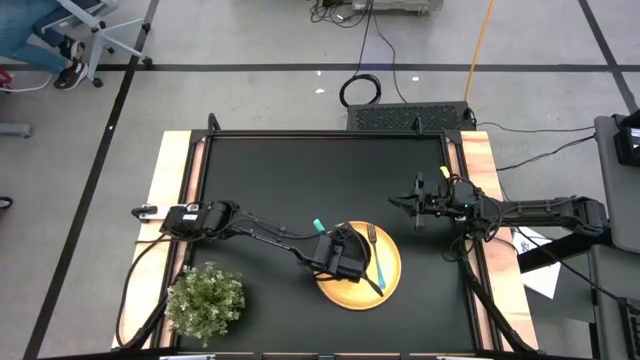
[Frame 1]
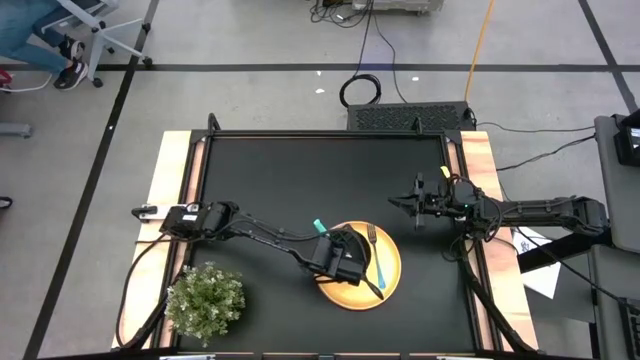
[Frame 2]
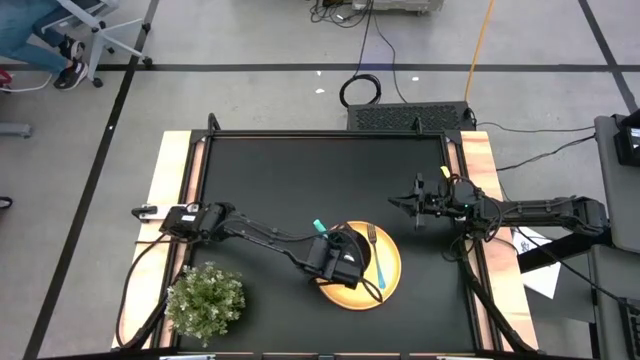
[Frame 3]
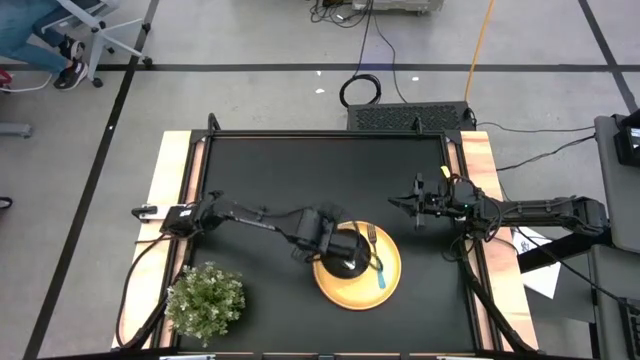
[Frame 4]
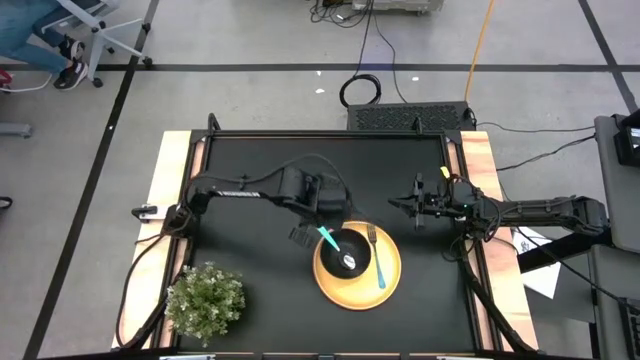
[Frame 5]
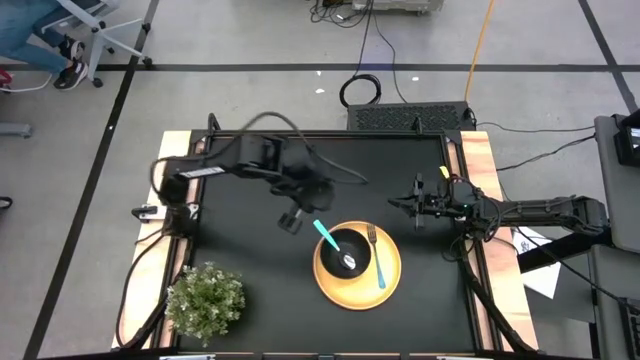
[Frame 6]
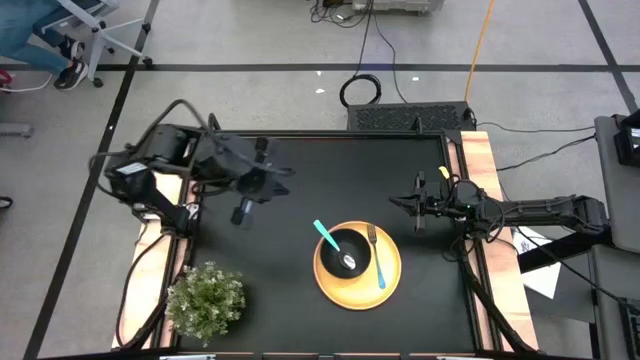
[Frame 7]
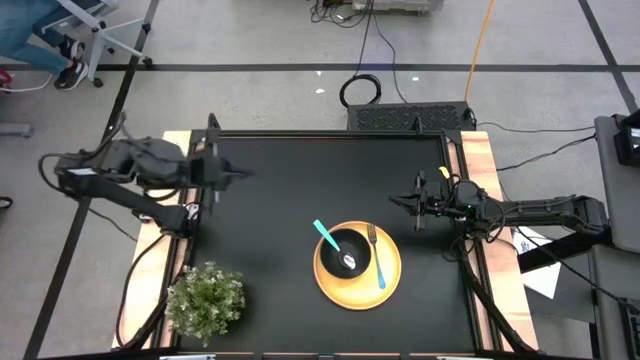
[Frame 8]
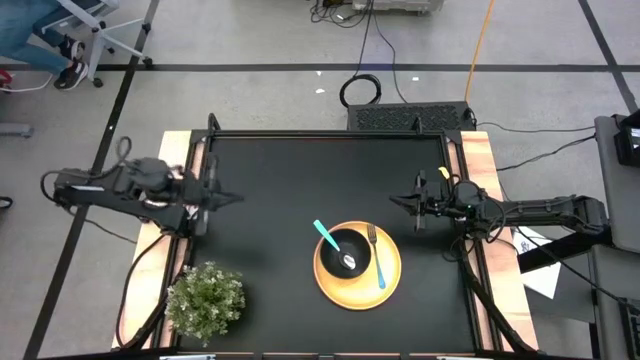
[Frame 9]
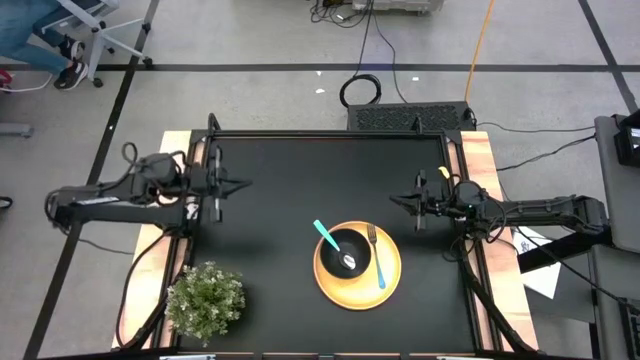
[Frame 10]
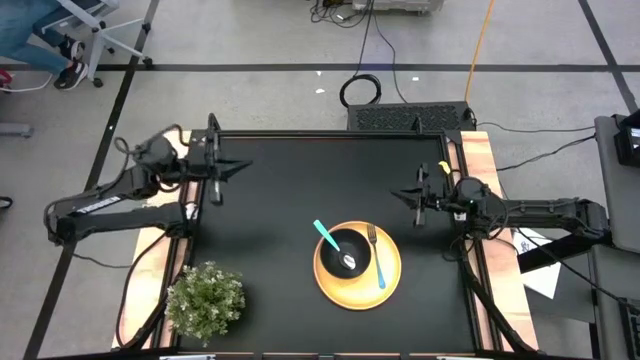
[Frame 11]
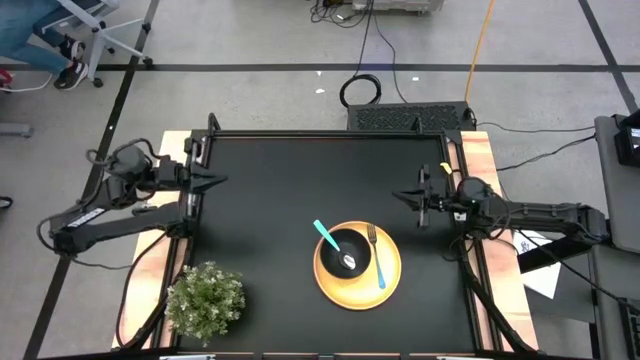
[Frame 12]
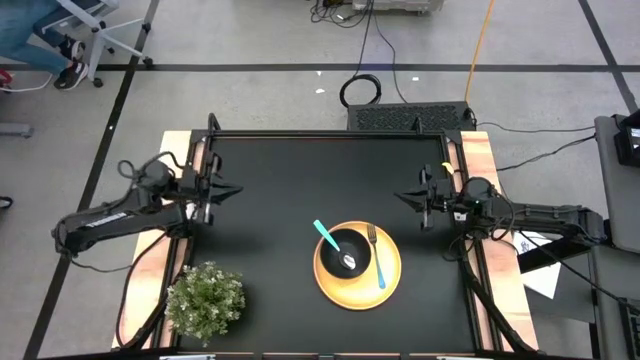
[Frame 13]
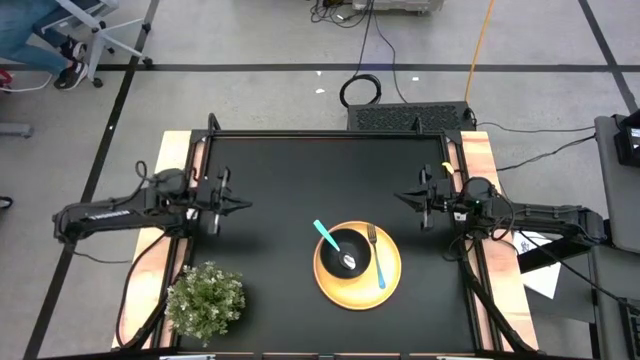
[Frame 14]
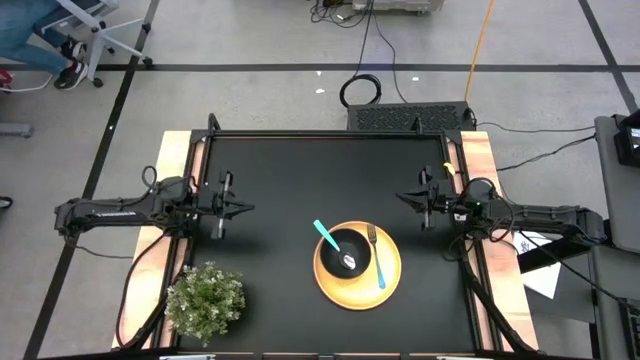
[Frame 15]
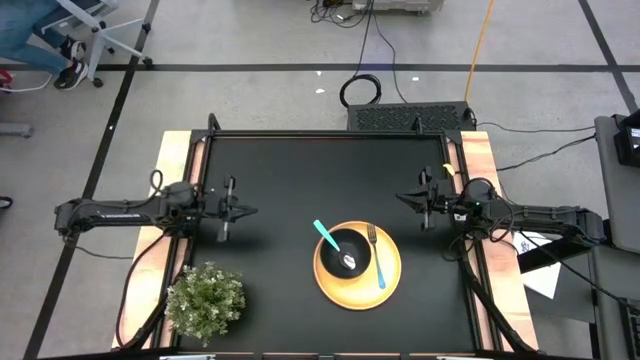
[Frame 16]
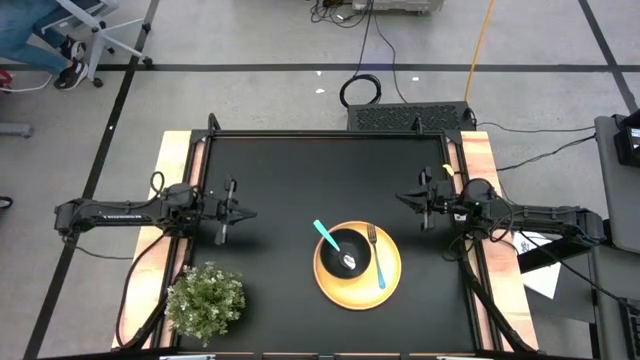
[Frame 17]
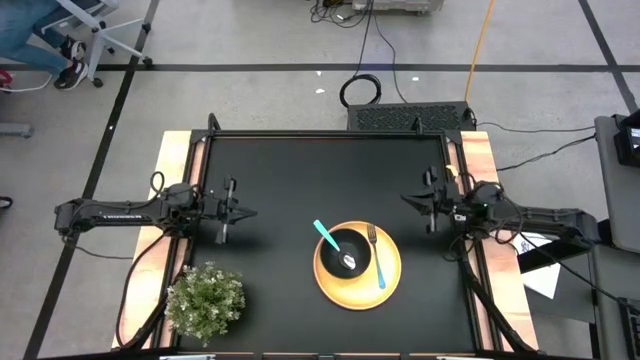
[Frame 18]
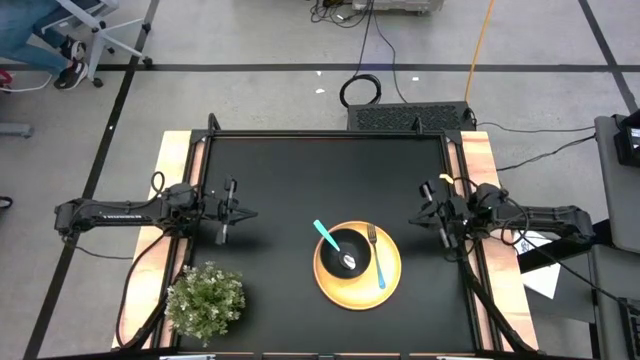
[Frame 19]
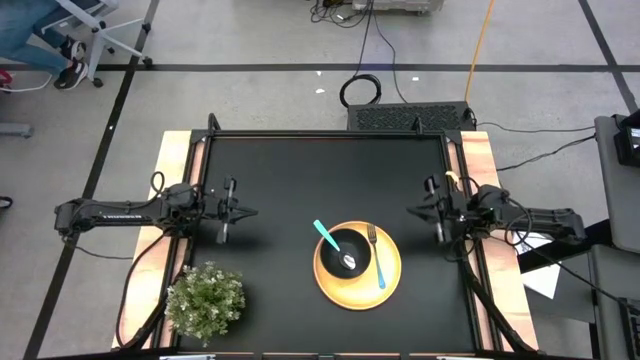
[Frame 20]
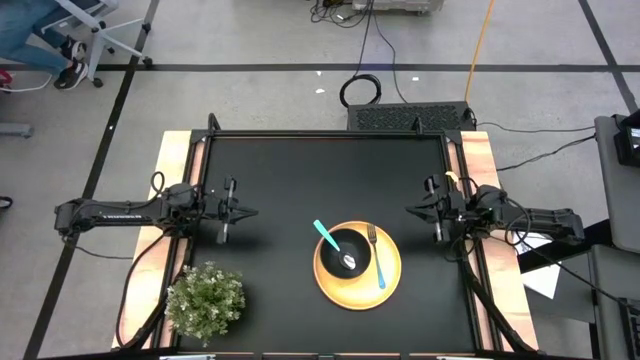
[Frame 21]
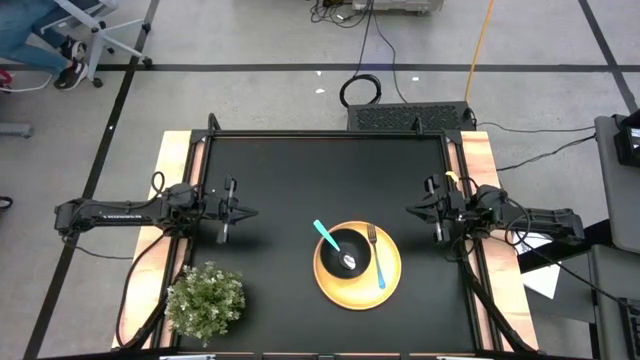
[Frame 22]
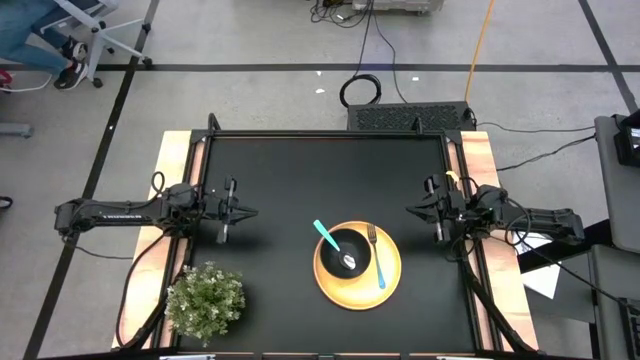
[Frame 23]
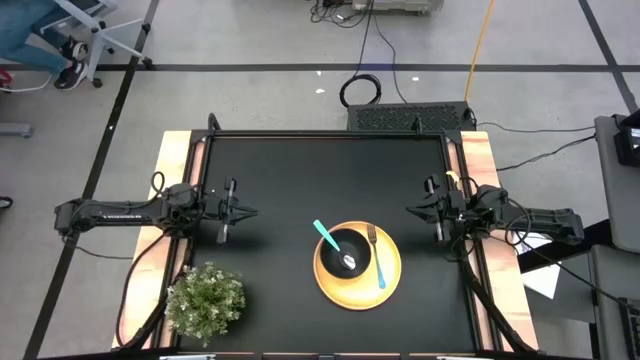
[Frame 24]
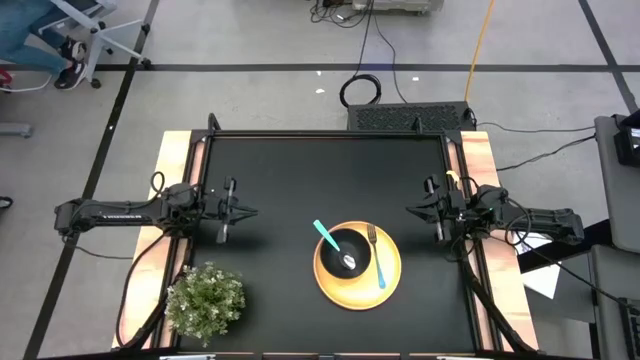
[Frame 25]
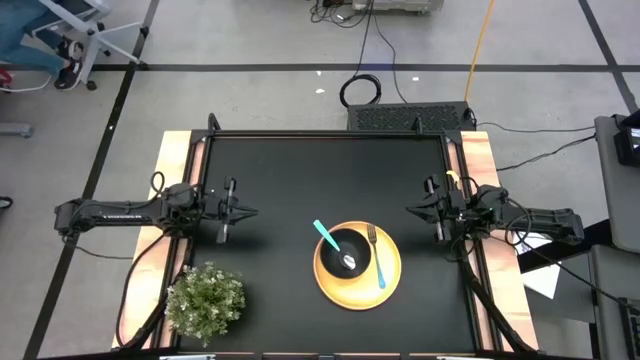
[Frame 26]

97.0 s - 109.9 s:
Task: Set table place
Return to Home Position

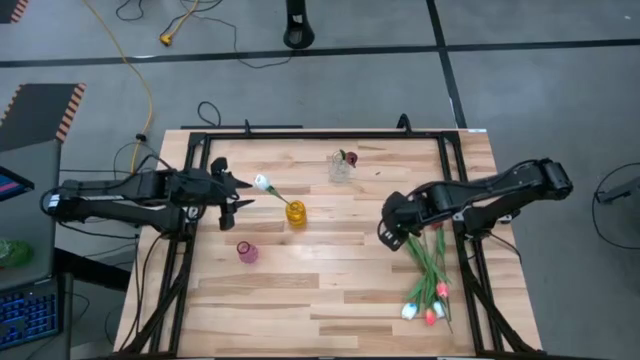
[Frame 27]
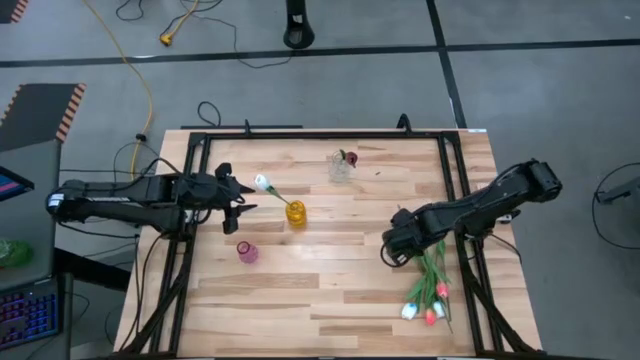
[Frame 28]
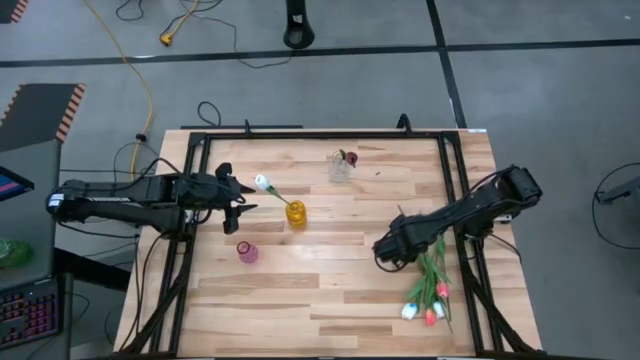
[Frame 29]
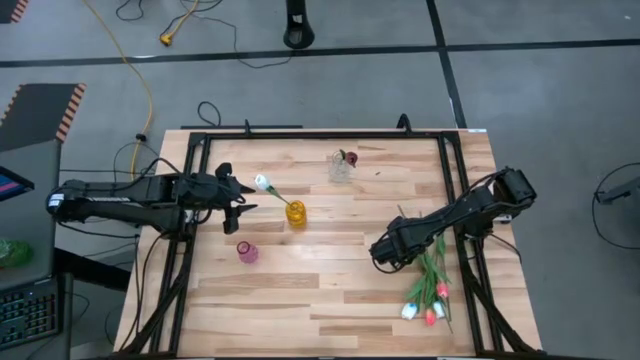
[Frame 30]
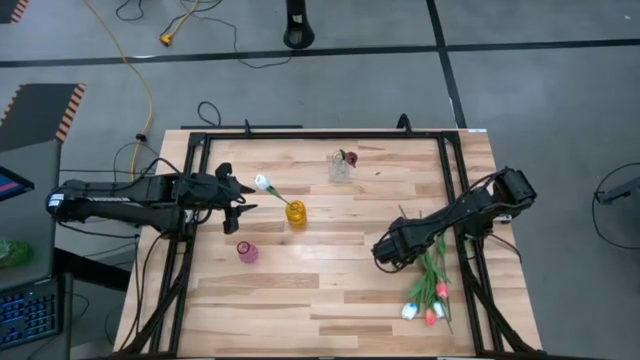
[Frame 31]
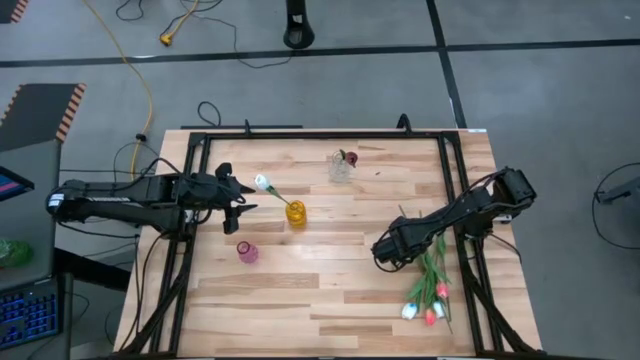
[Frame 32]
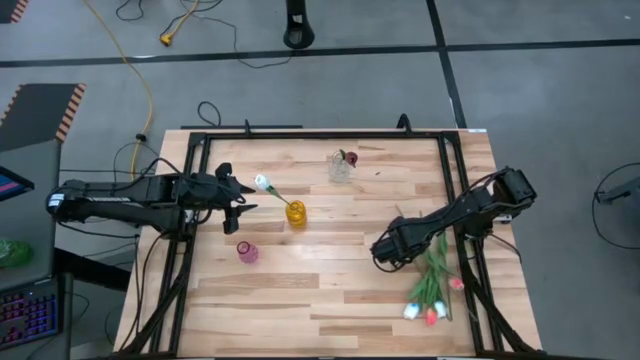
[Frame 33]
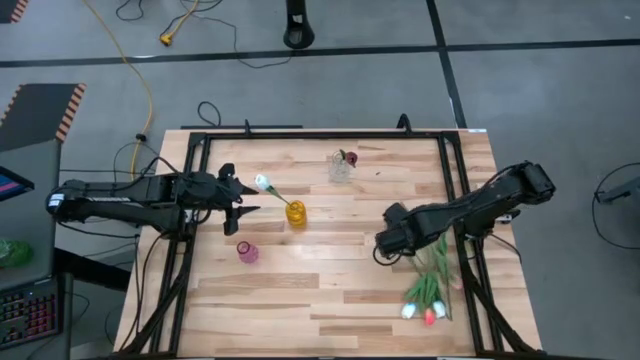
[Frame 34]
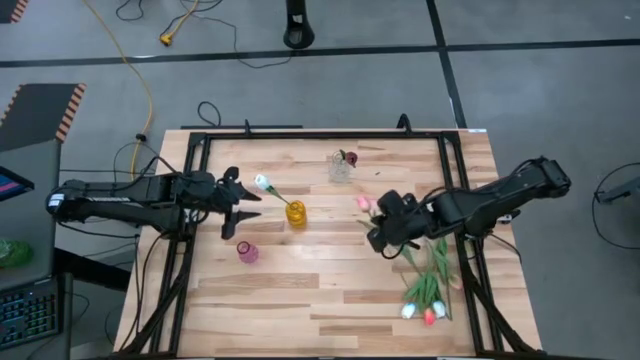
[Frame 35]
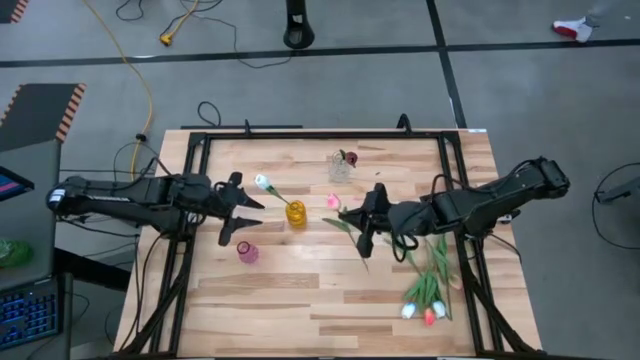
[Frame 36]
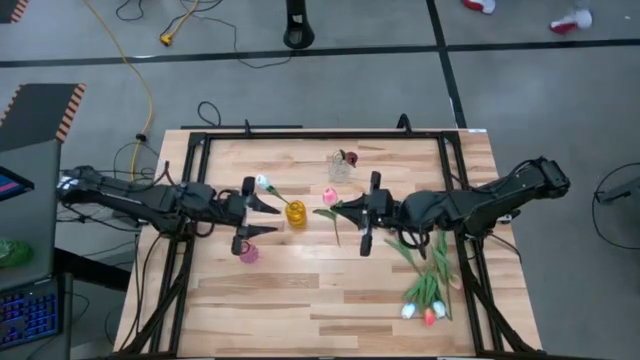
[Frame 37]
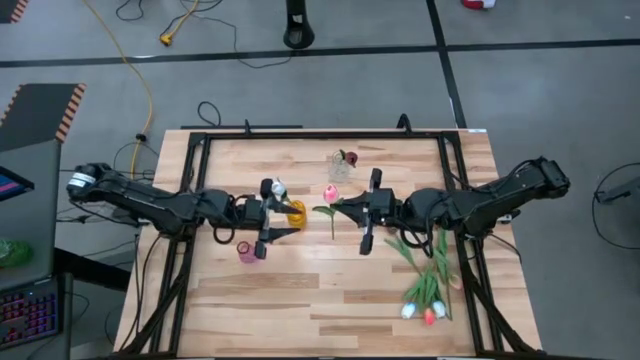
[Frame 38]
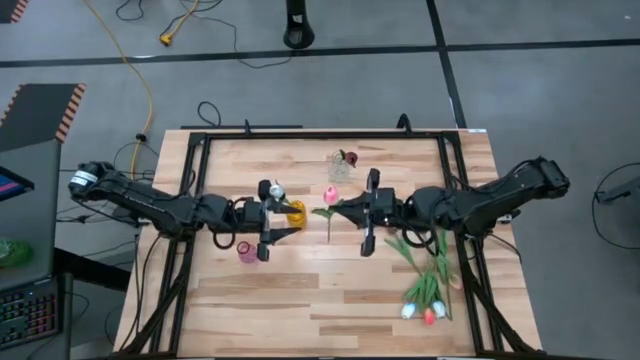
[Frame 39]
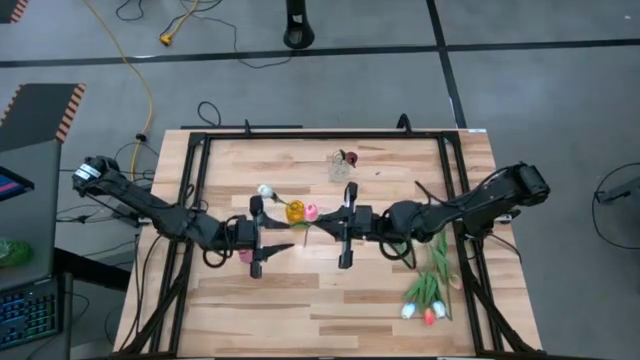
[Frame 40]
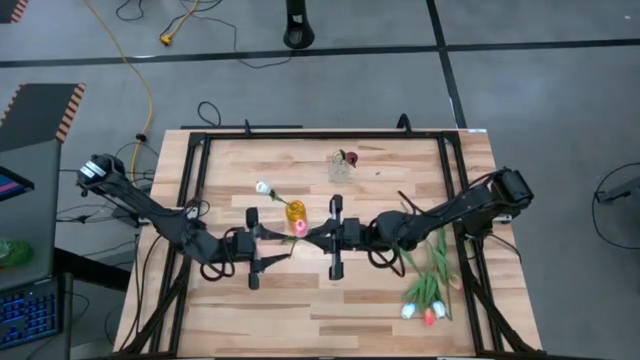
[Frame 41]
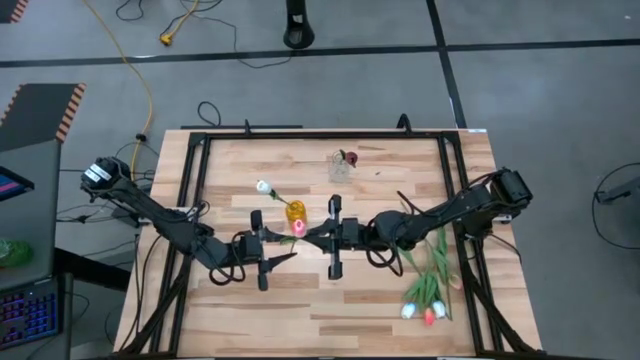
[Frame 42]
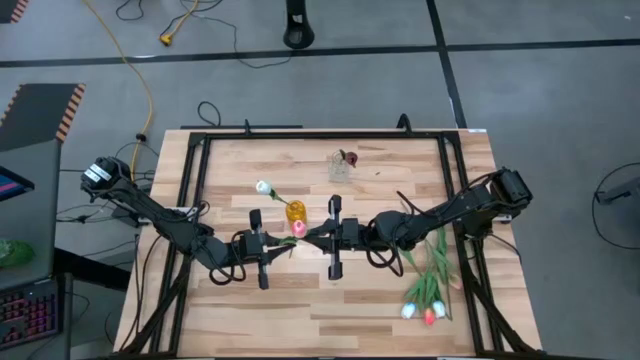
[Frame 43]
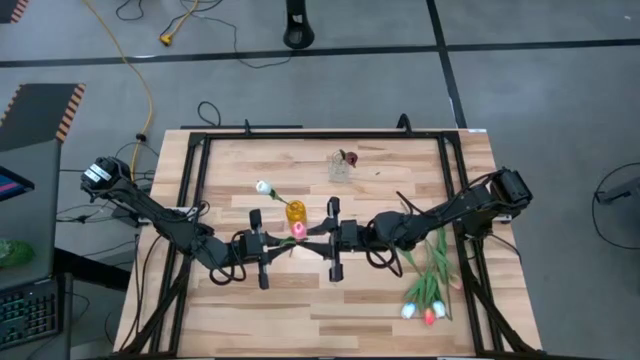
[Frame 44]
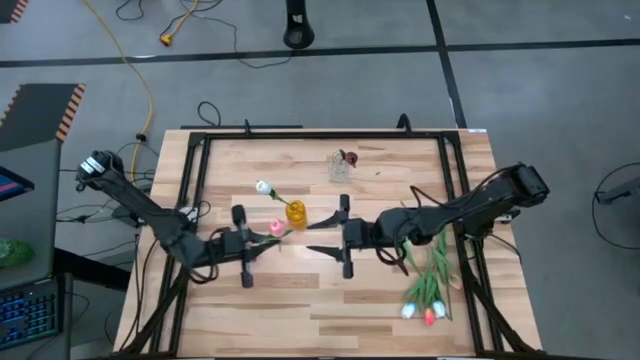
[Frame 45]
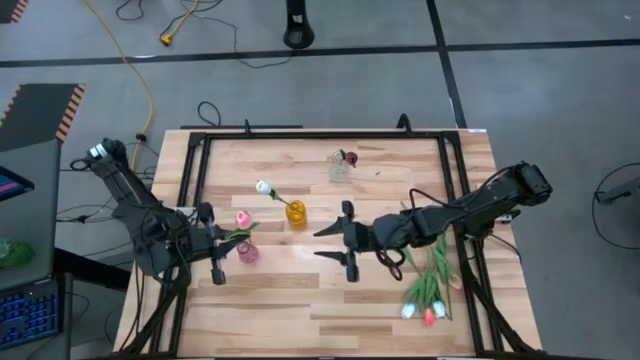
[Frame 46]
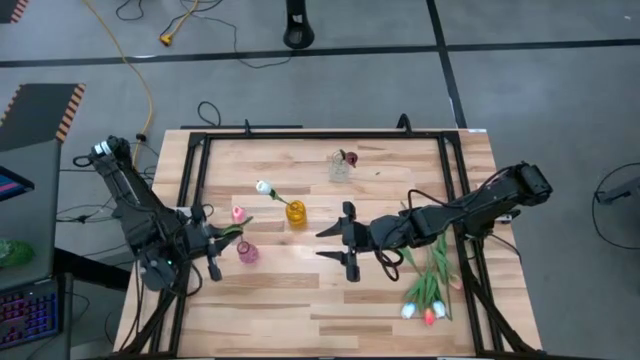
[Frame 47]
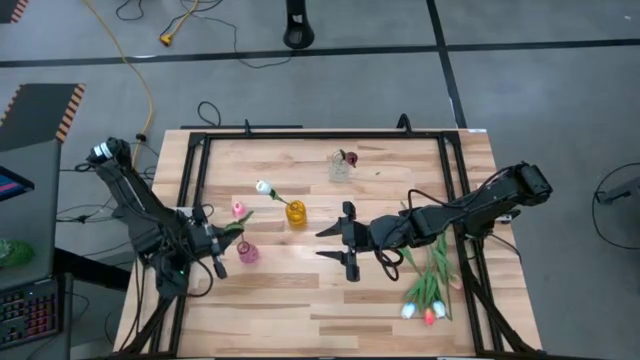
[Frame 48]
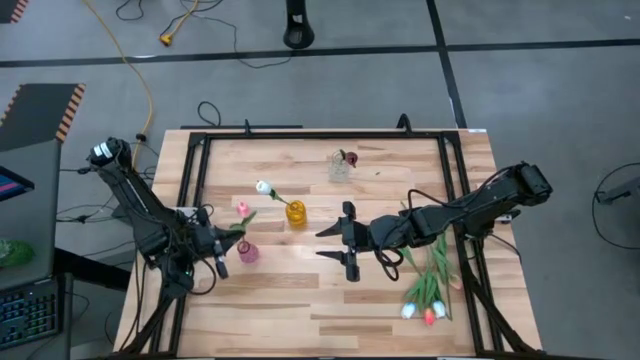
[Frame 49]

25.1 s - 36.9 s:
Task: Sort flowers into vase by color
Put the pink flower into the purple vase
